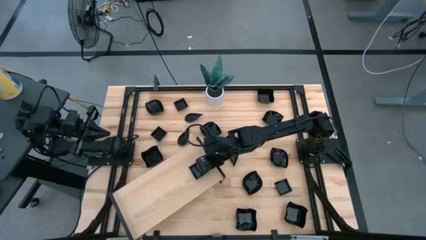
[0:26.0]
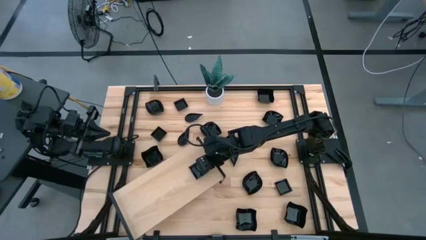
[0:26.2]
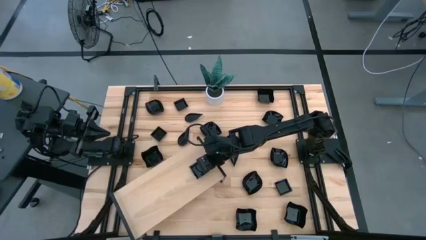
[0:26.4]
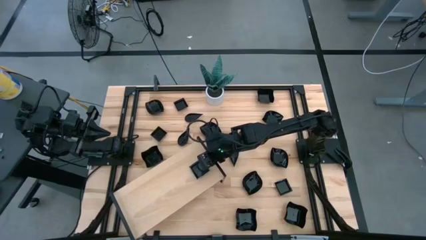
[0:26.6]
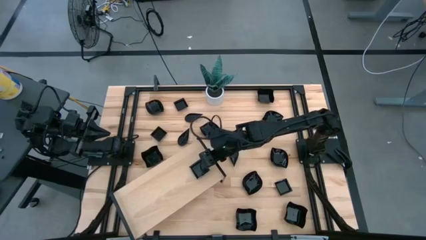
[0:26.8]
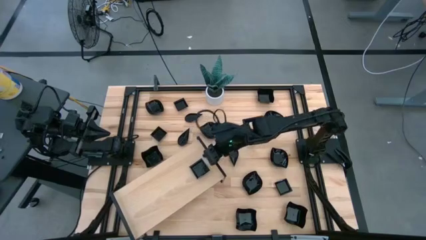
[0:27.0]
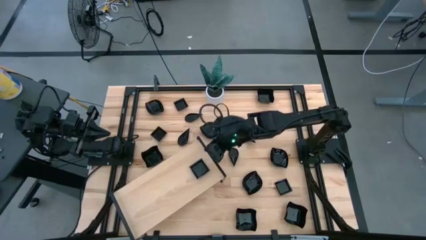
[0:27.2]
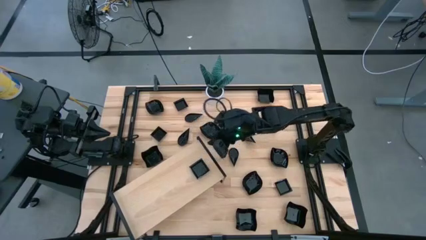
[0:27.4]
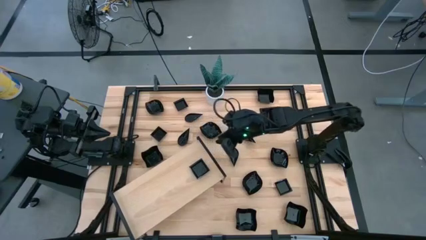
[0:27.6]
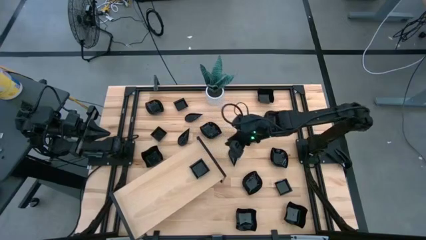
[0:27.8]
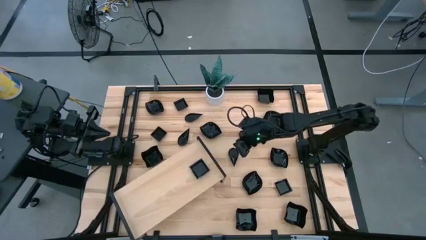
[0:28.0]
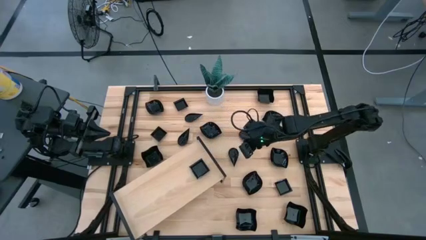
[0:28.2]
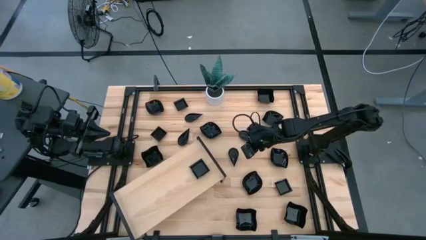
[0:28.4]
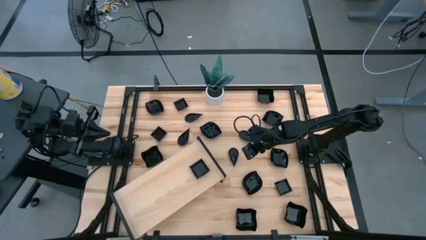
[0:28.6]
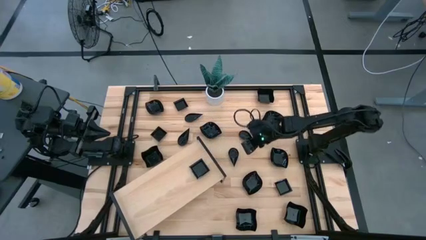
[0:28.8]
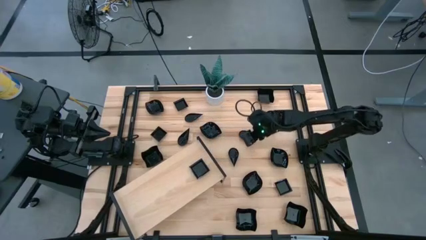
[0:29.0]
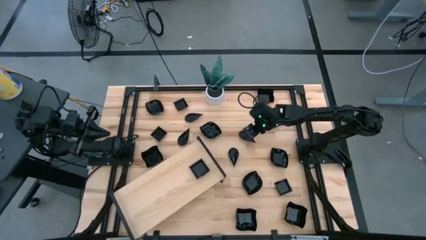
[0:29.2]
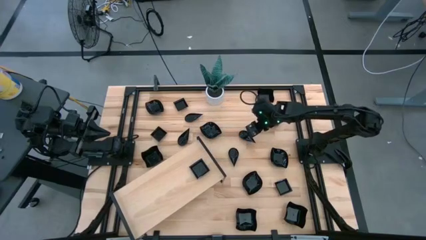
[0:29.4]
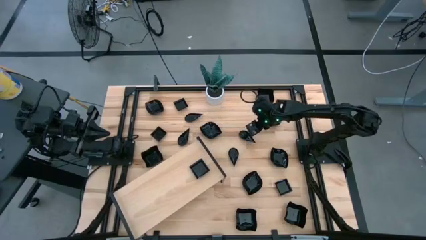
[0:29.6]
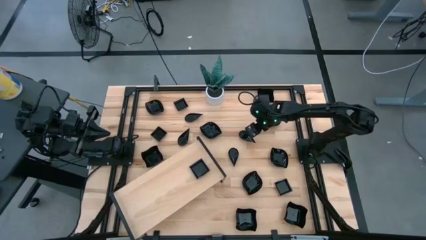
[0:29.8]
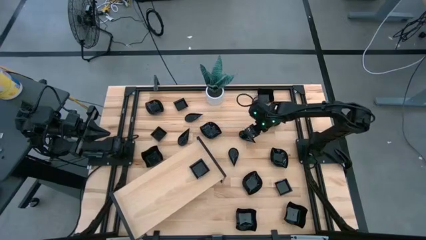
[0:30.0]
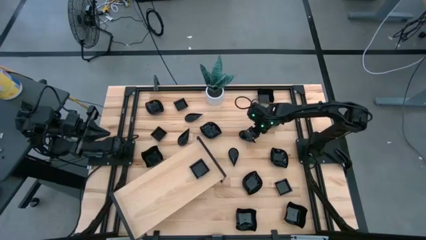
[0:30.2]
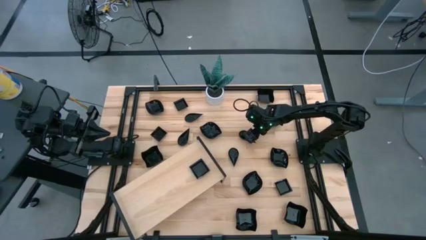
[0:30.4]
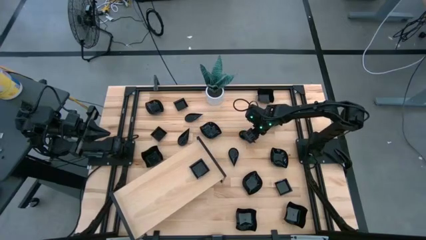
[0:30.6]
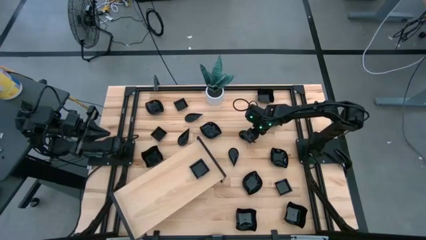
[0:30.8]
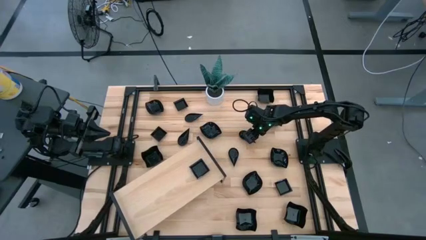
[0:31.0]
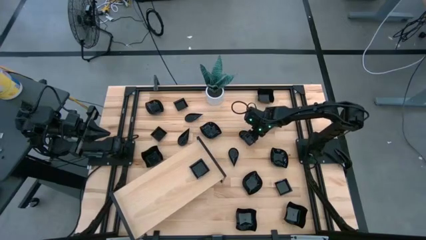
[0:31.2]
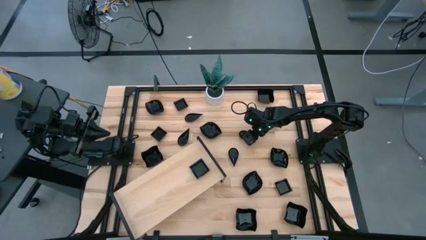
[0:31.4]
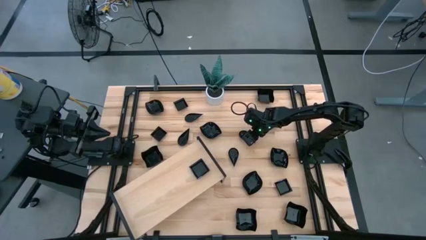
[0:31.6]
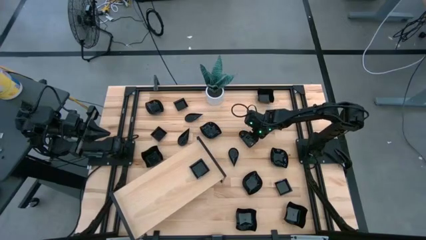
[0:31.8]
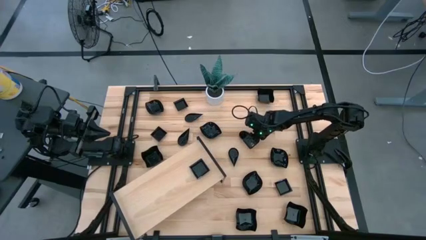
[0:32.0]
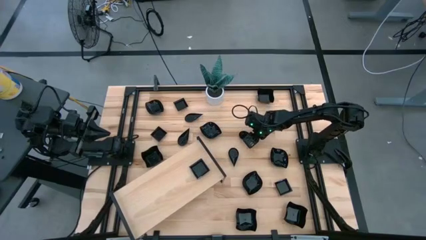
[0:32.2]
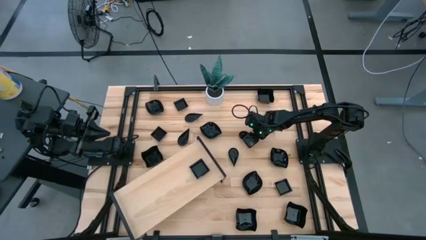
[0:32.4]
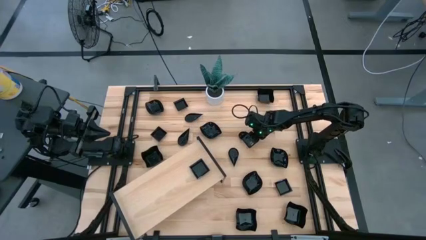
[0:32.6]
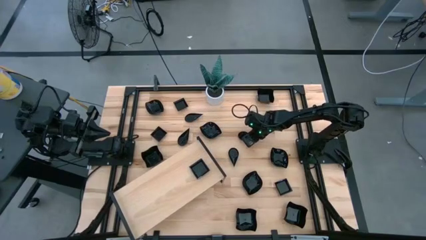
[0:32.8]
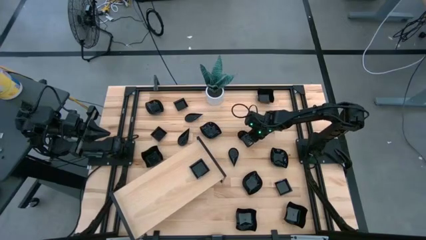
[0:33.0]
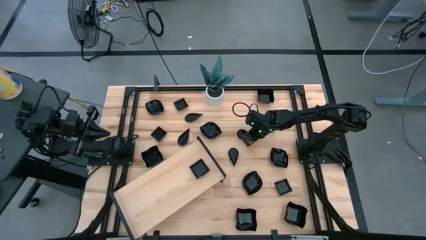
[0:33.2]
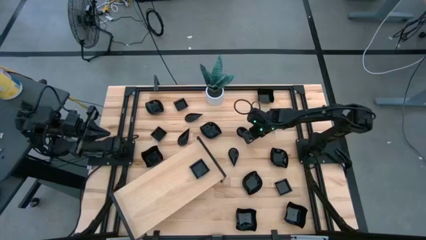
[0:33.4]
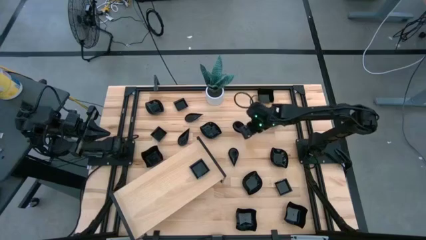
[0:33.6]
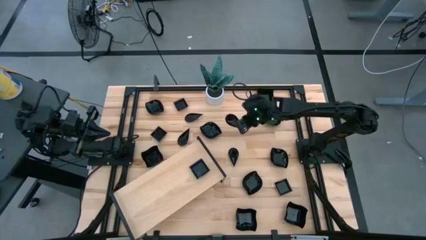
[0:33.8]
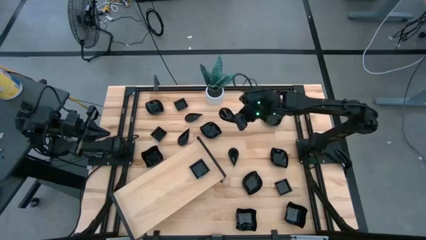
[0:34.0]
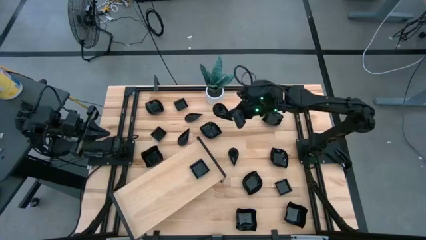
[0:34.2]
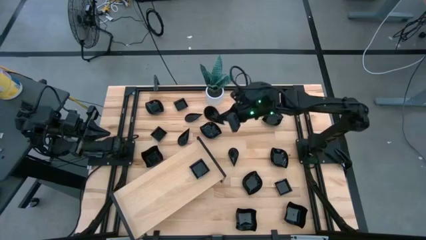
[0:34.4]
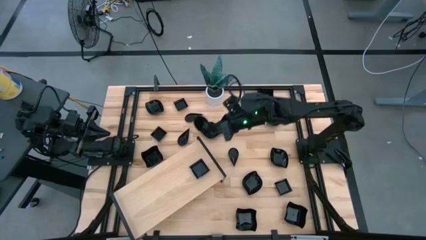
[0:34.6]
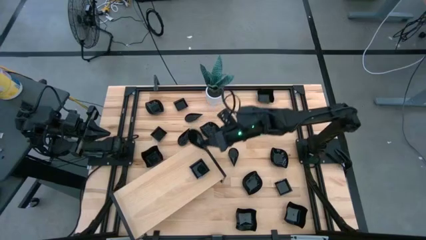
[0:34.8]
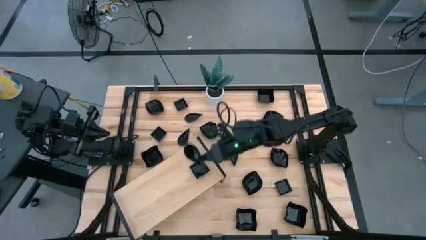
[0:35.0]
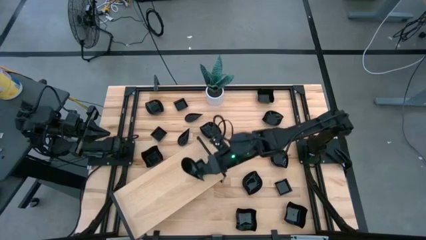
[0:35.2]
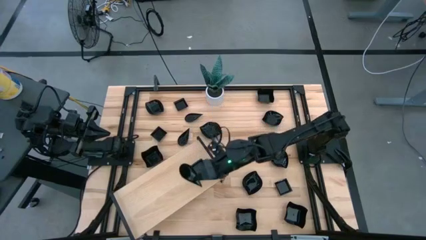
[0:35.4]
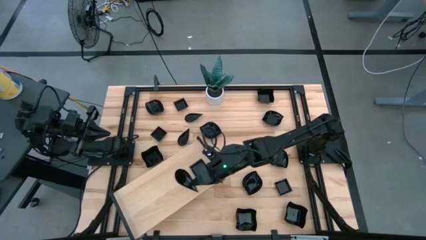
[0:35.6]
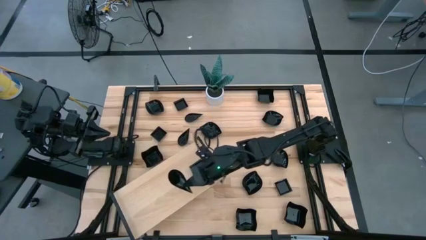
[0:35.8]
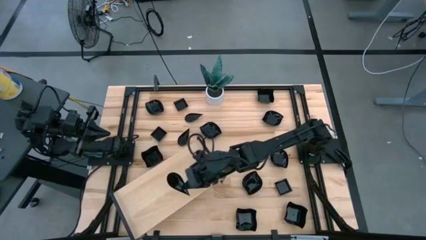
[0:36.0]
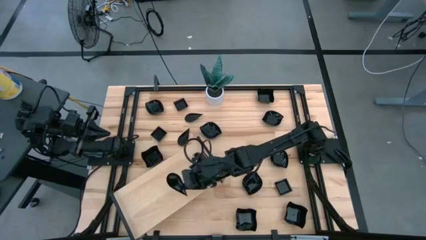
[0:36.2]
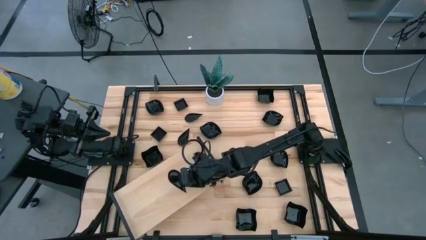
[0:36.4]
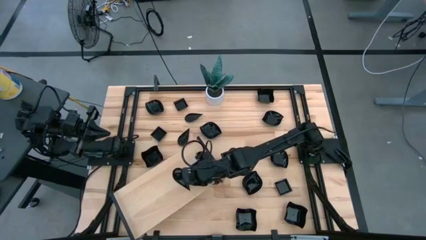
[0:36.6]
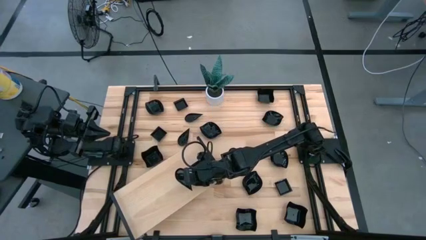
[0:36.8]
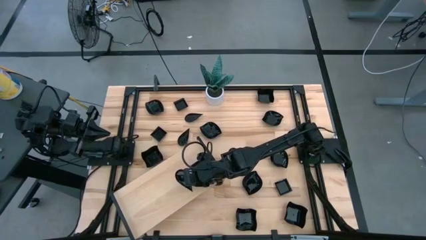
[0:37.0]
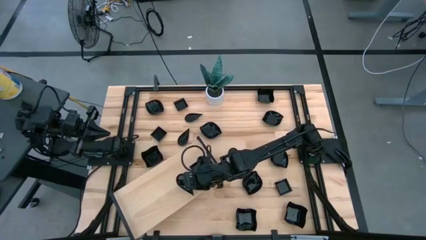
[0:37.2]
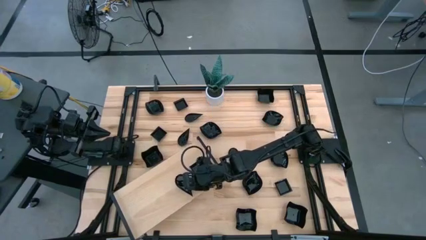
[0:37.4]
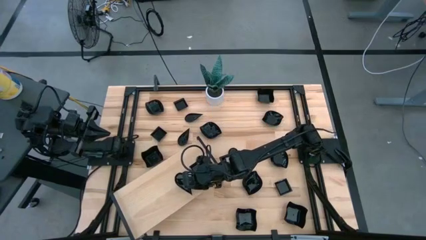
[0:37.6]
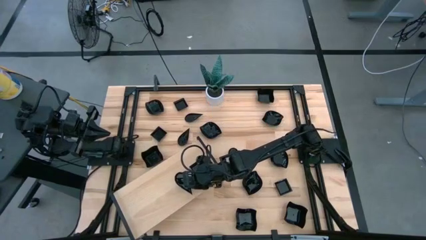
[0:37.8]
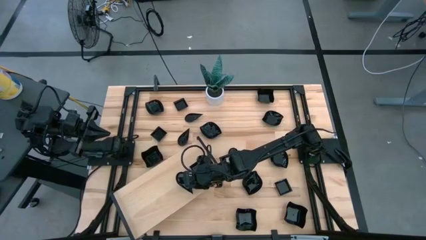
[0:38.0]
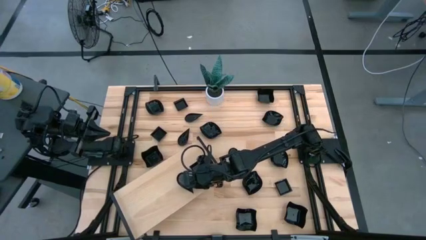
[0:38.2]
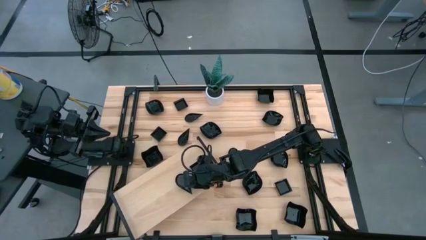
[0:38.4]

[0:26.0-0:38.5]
Task: Pick & Place Mini shaped plates
Put the black drop shaped plate on the shelf

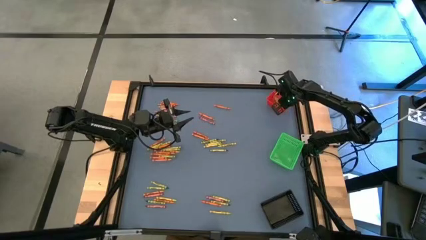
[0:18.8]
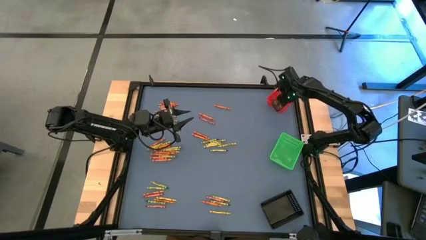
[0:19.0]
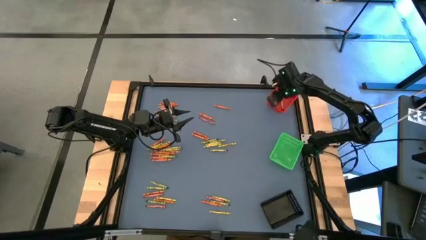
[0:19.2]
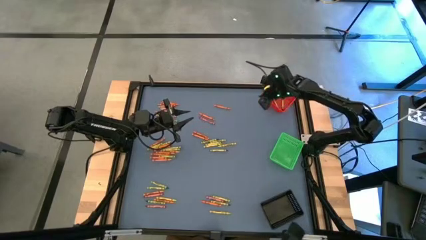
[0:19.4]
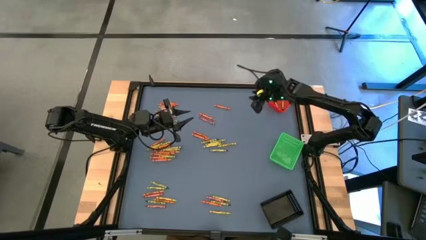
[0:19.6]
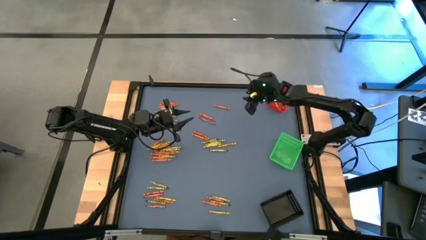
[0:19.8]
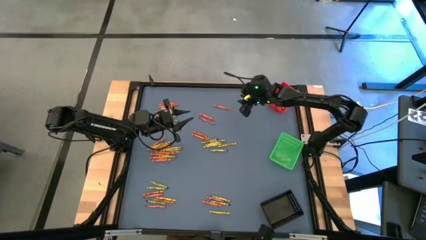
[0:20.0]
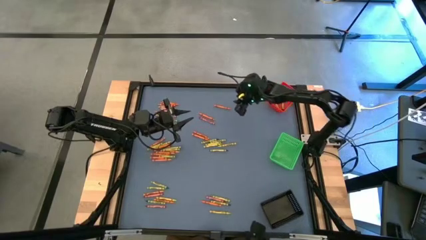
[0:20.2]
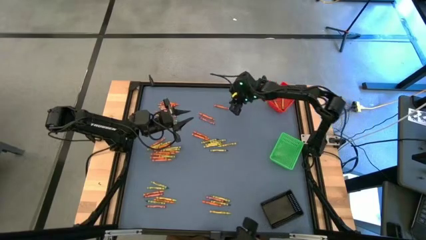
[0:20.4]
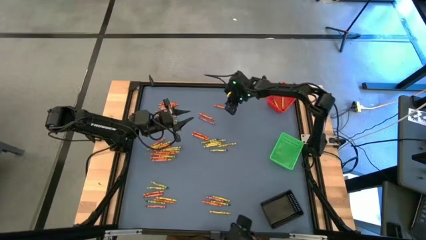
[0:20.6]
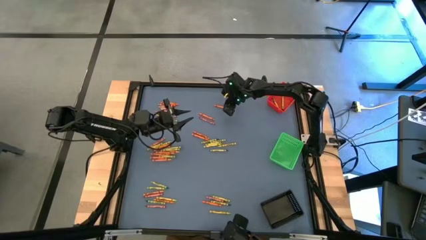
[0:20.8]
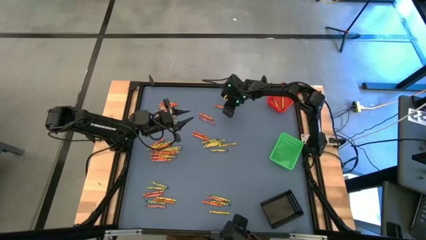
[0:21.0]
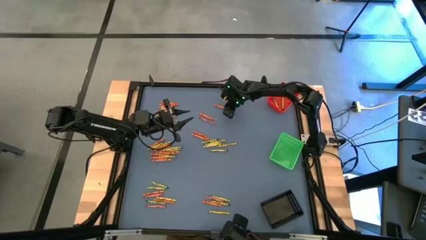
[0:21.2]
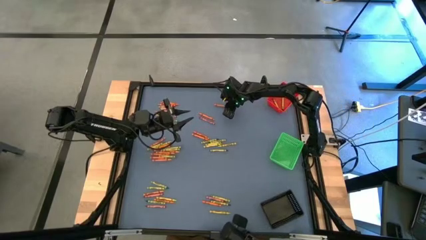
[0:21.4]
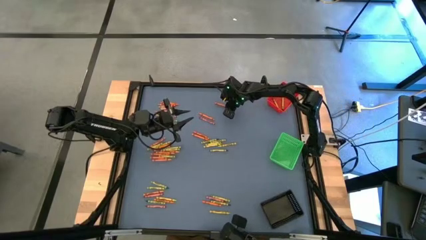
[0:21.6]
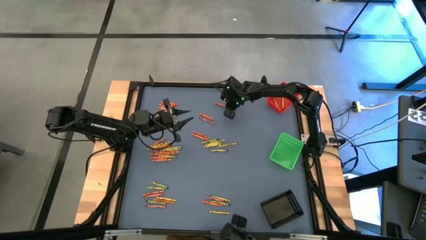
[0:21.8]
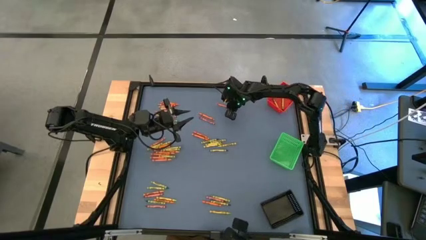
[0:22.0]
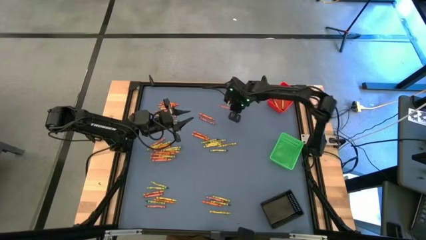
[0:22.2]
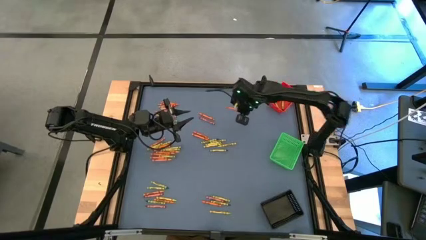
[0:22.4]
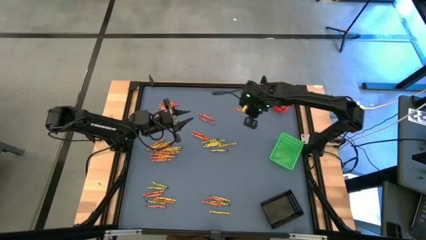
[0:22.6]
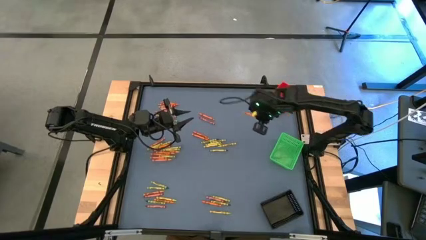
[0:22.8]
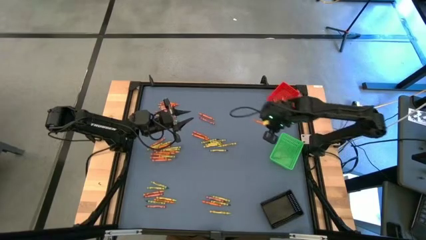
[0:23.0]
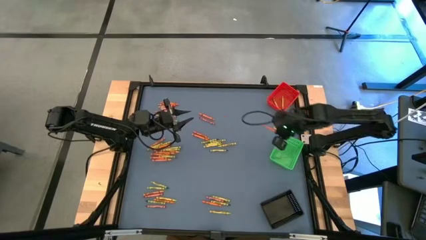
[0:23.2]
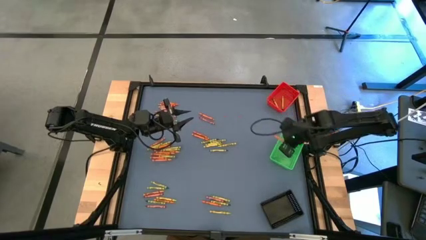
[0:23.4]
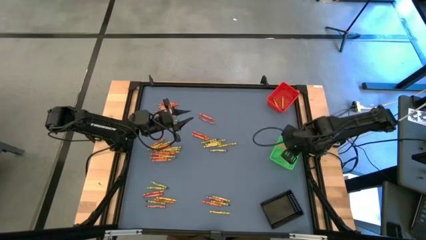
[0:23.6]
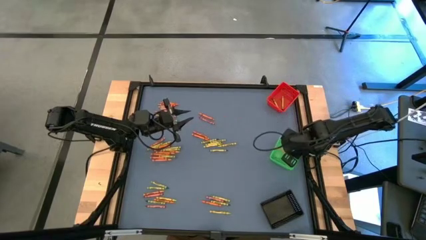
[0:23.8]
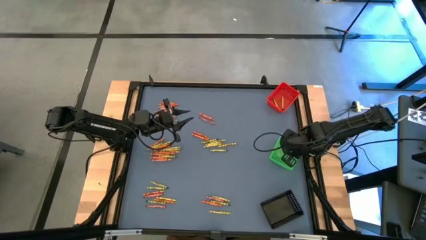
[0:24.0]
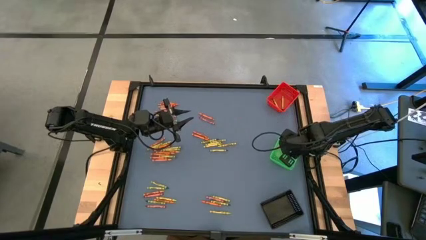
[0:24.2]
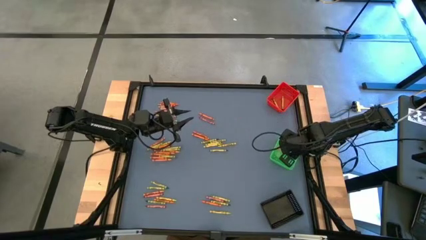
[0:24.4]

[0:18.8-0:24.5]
Task: Sort crayons
Put the orange crayon into the green bin
